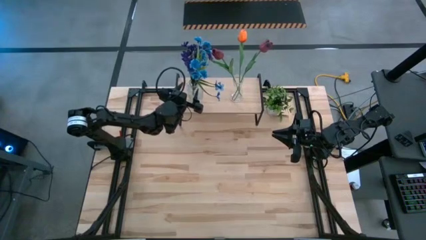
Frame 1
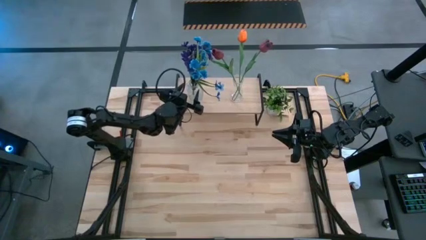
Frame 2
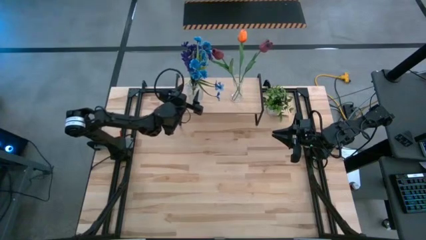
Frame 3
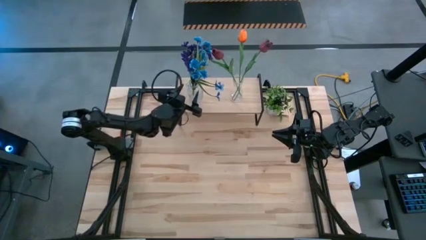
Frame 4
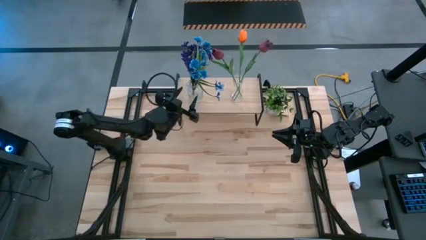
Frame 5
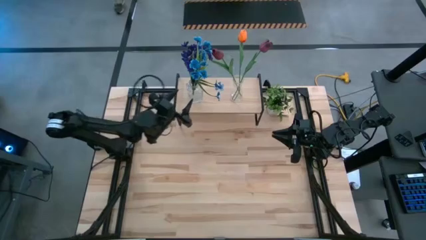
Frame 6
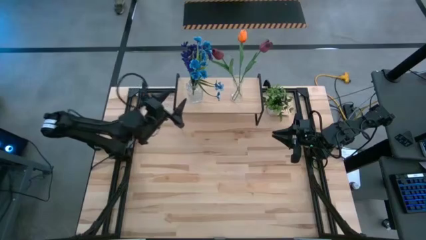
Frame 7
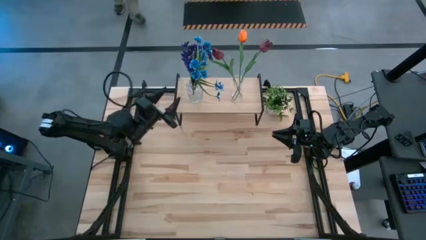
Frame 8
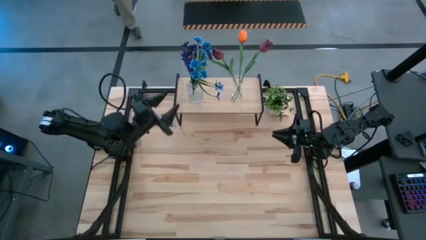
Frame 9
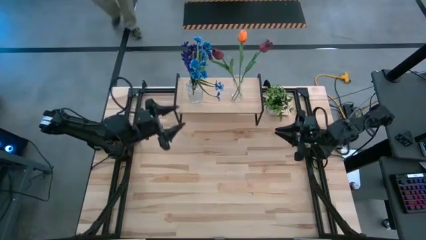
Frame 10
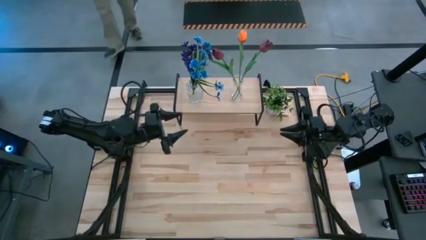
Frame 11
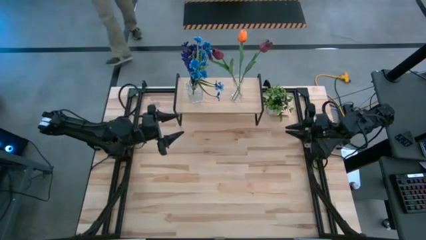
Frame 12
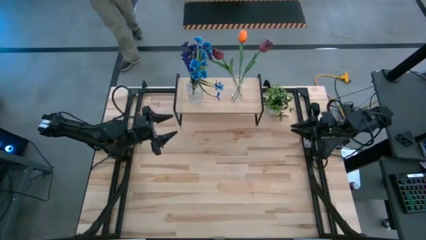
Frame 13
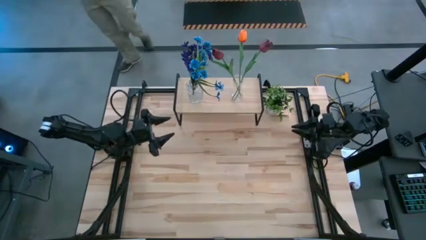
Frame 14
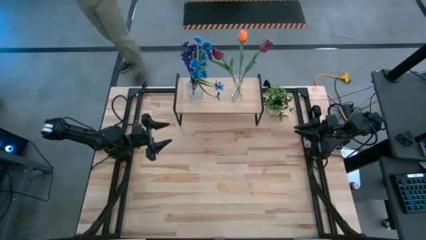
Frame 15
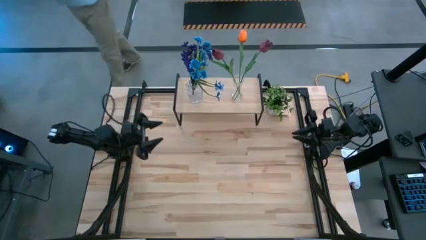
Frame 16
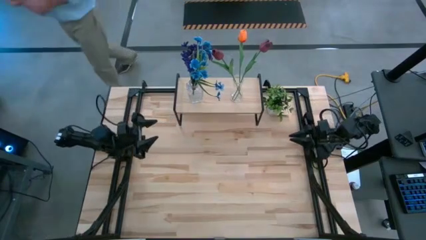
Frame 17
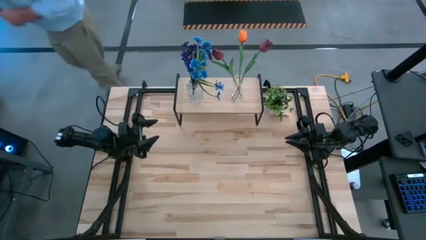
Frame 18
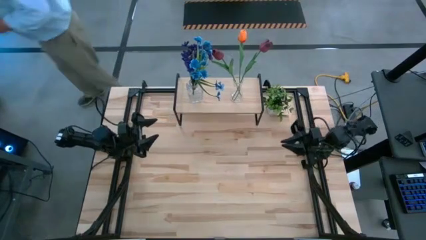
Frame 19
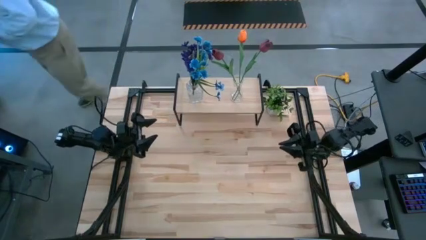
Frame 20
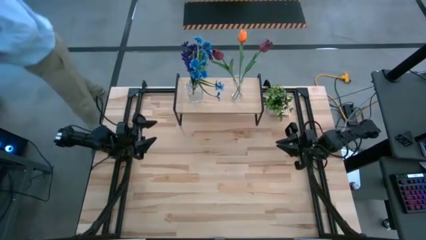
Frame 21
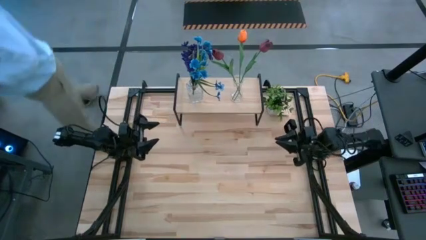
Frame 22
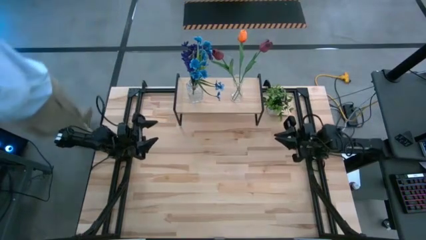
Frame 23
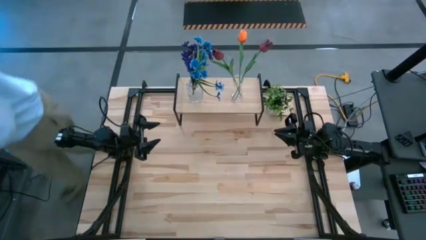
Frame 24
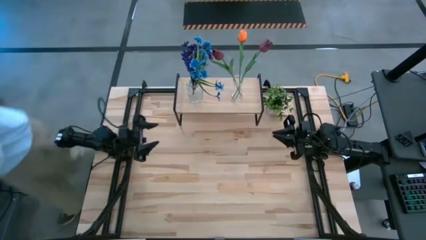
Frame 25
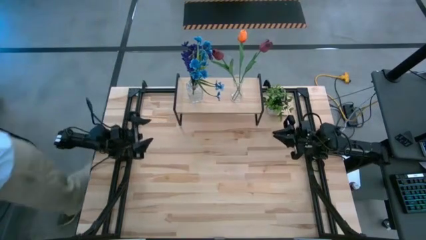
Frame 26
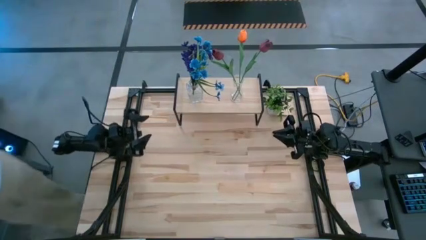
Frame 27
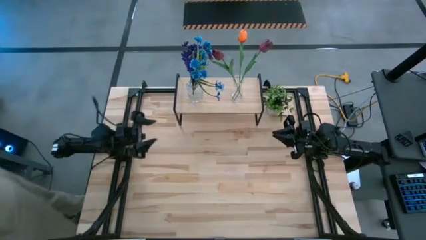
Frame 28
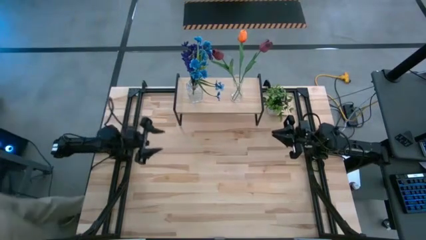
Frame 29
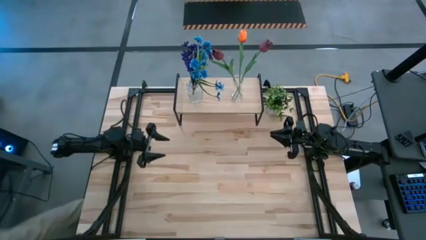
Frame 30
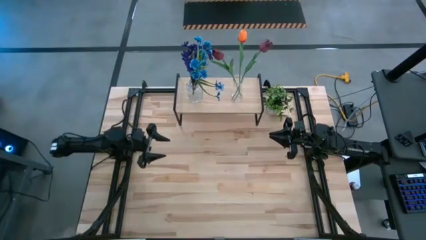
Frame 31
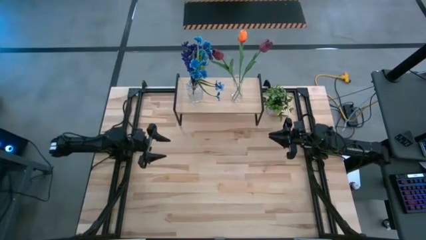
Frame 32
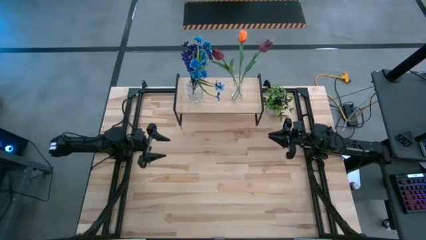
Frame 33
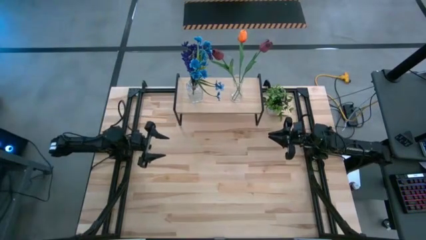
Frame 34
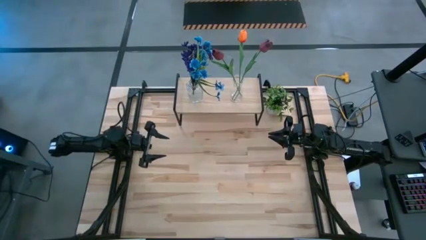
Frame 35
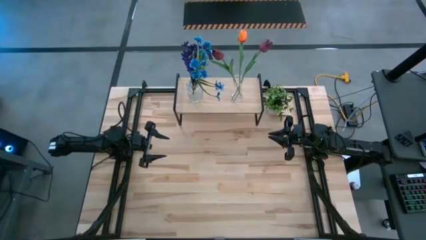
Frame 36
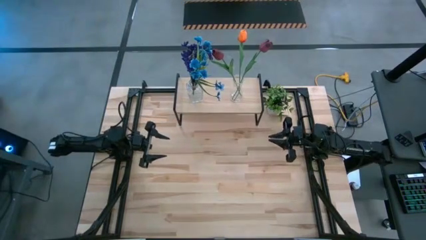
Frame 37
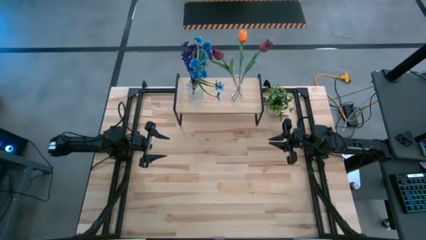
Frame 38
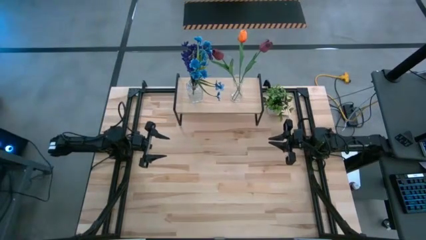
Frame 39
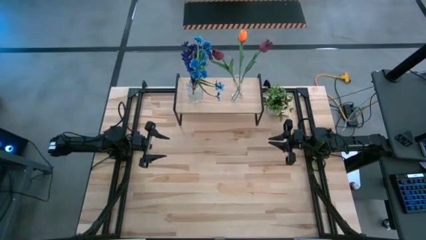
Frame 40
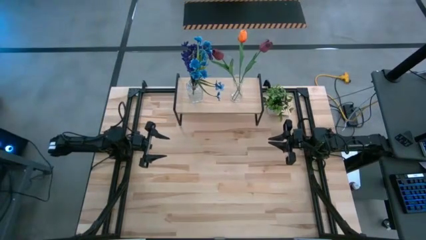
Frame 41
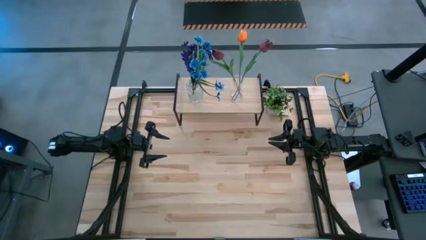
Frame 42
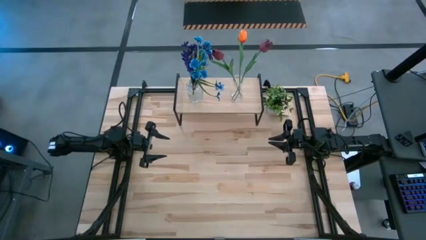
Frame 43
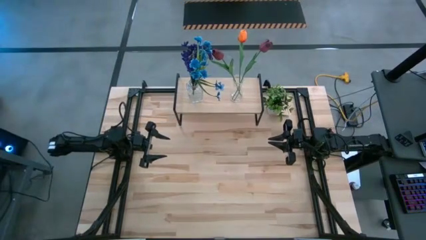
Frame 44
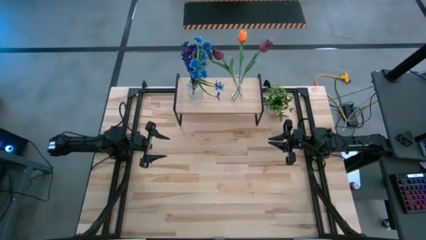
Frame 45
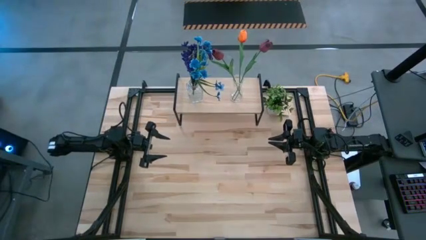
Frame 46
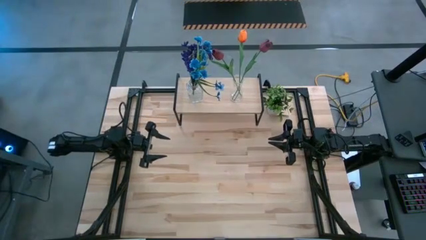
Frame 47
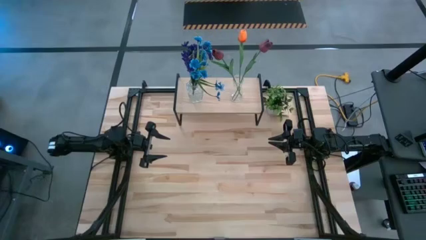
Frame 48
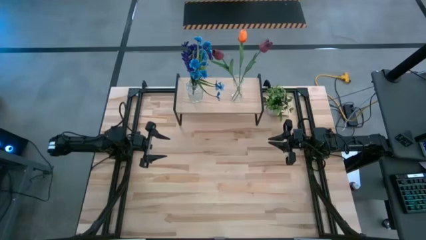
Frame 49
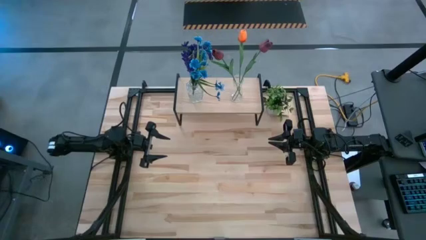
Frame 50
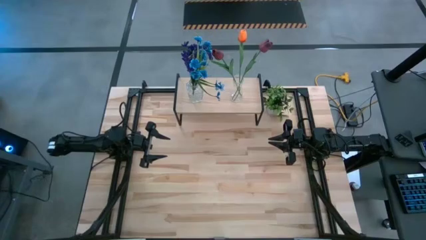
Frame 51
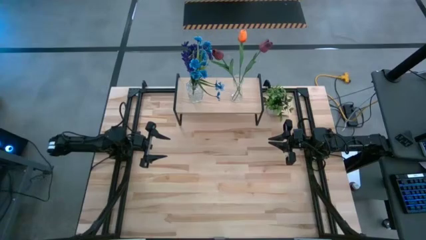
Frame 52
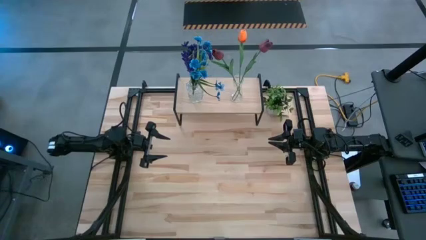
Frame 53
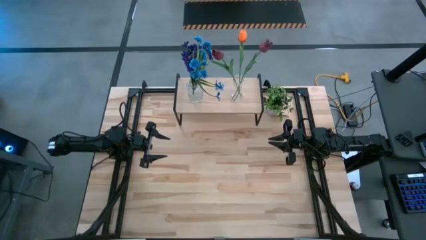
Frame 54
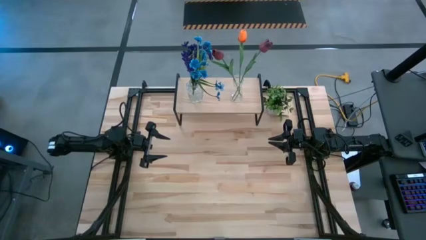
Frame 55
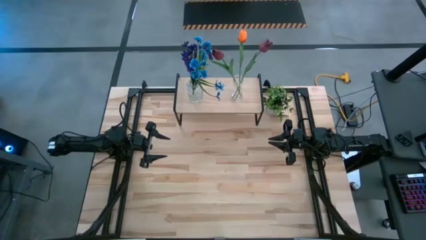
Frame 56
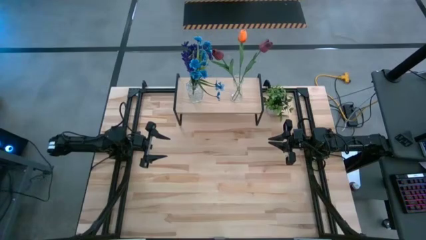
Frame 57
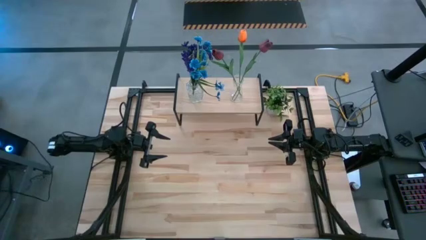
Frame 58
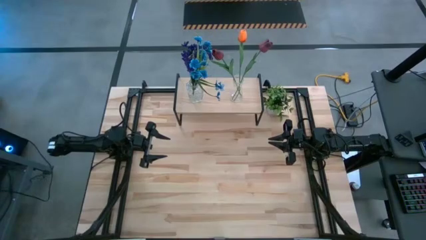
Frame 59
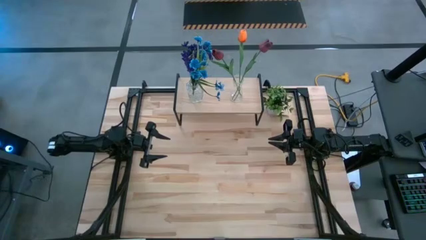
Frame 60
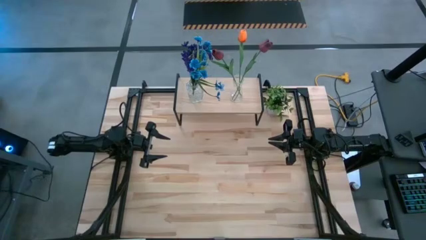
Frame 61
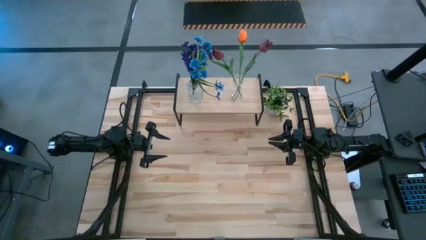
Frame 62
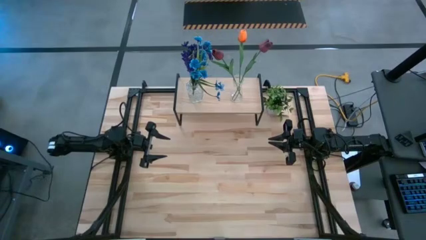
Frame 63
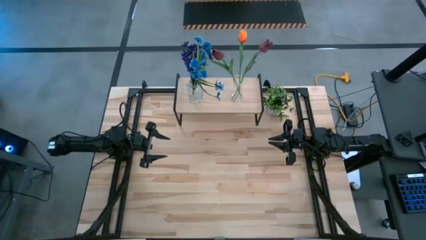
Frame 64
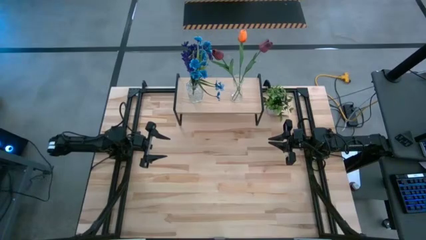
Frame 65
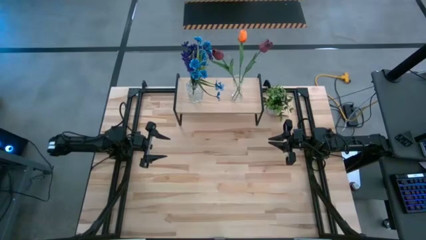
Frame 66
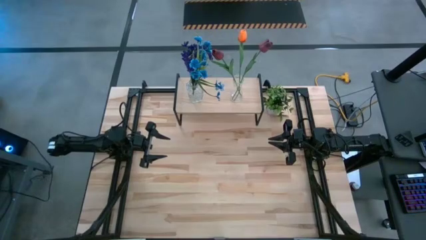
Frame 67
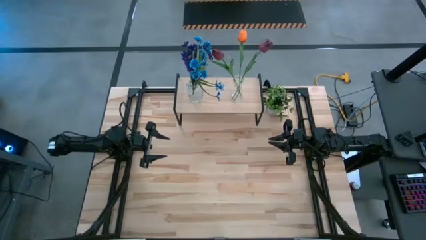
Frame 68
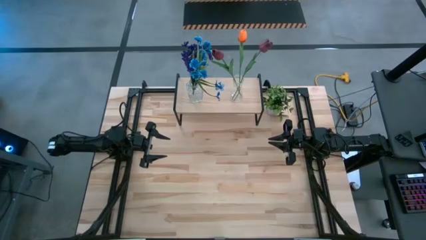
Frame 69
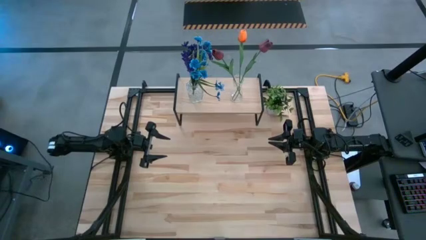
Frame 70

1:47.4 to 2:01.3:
Task: Pick and place flowers into a vace then onto a shelf
Return to Home Position
